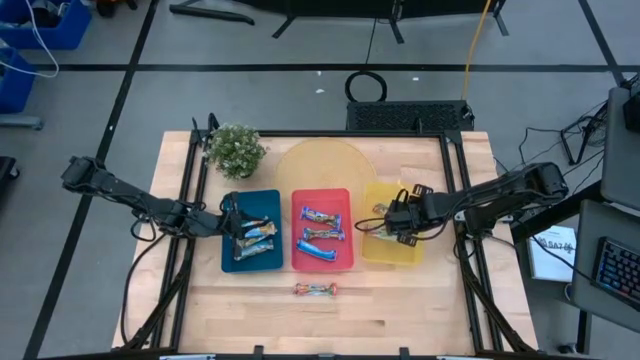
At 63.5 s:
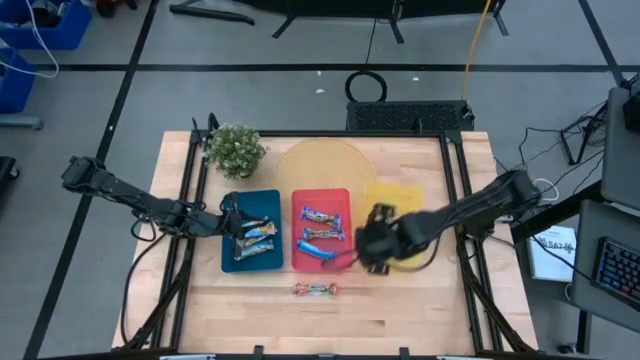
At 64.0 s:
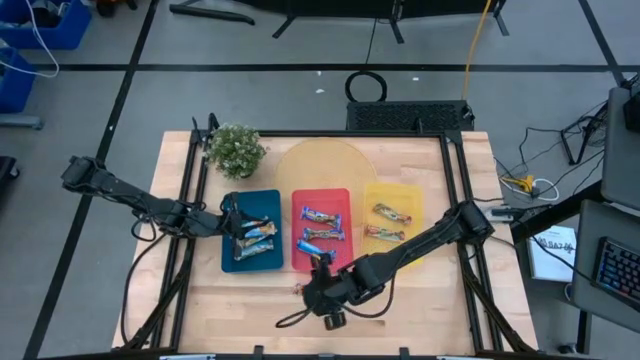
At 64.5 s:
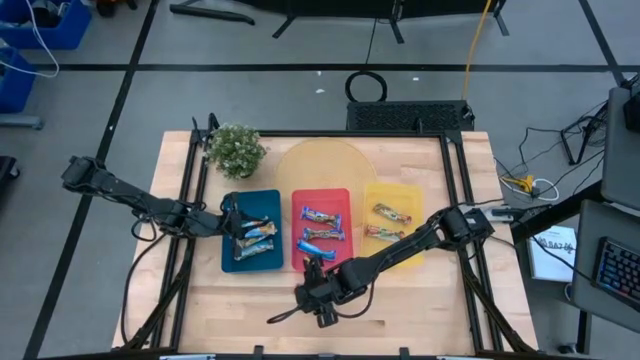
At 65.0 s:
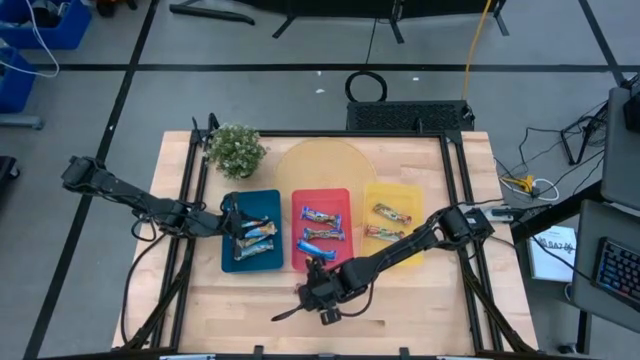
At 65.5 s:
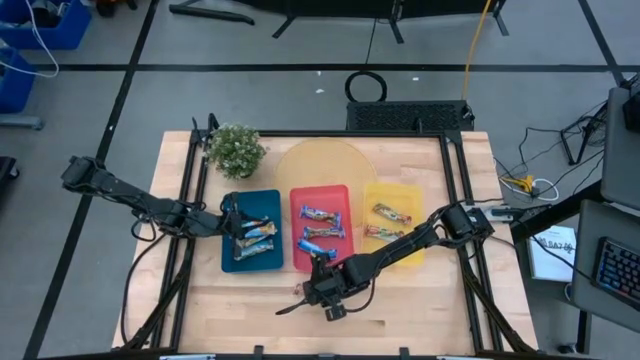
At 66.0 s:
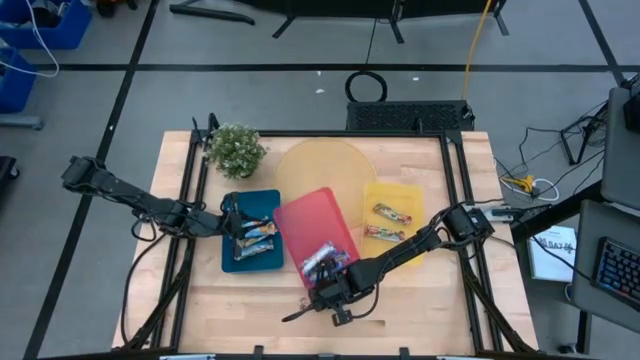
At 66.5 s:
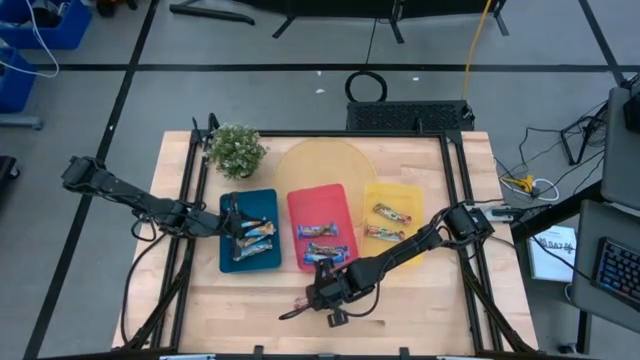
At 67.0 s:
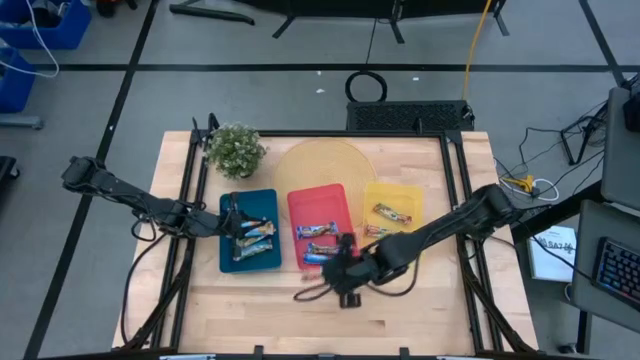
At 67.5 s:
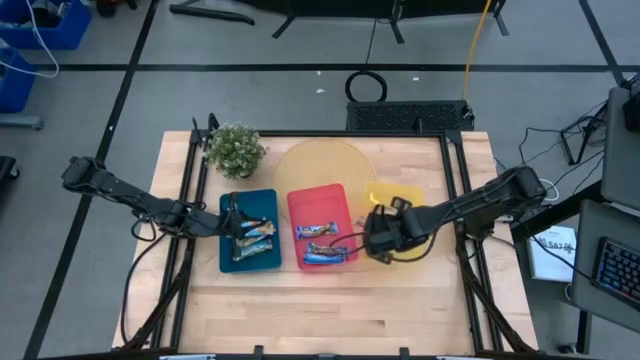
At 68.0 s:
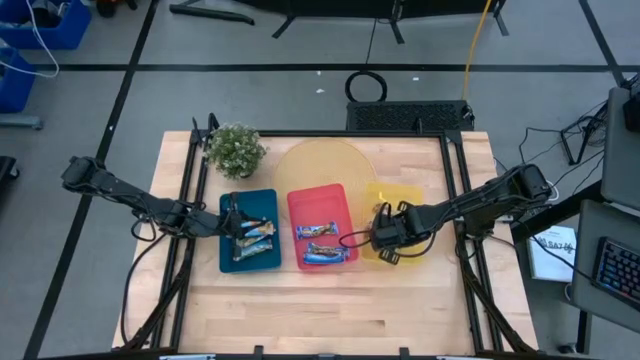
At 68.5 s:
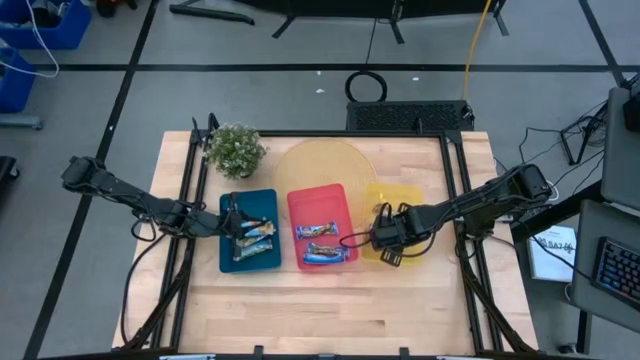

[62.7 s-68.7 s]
Task: Pick and place Granola Bars by type
Put the red granola bar into the yellow bin

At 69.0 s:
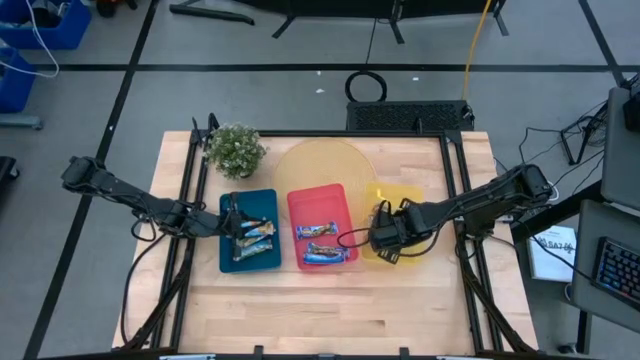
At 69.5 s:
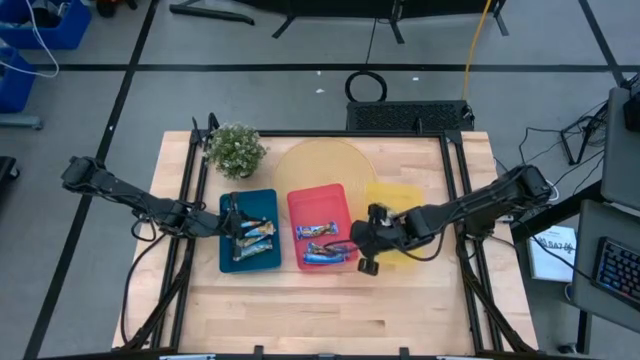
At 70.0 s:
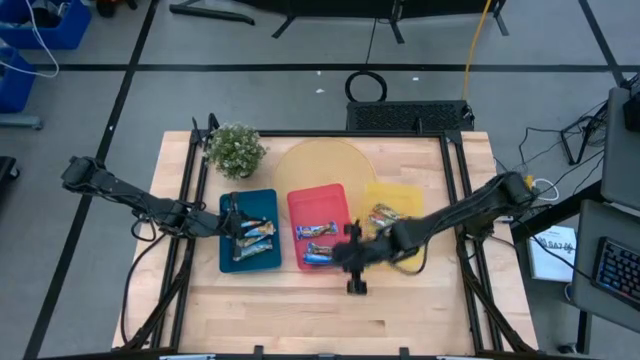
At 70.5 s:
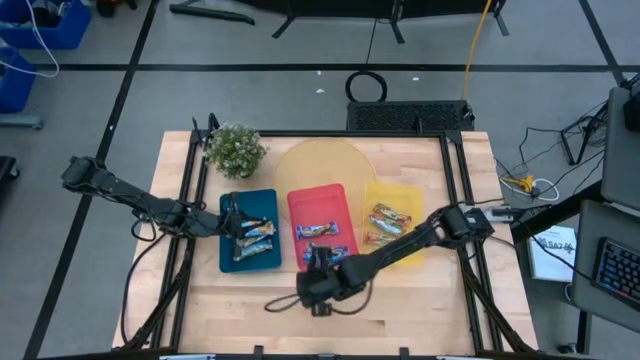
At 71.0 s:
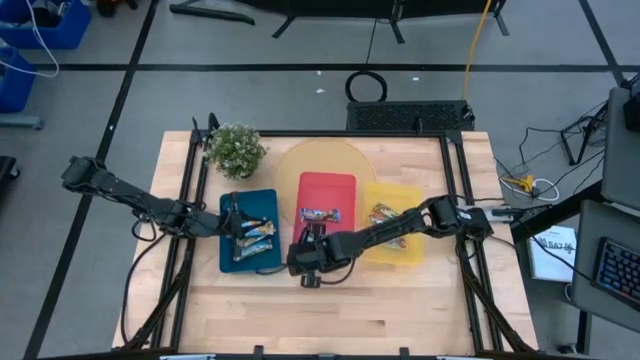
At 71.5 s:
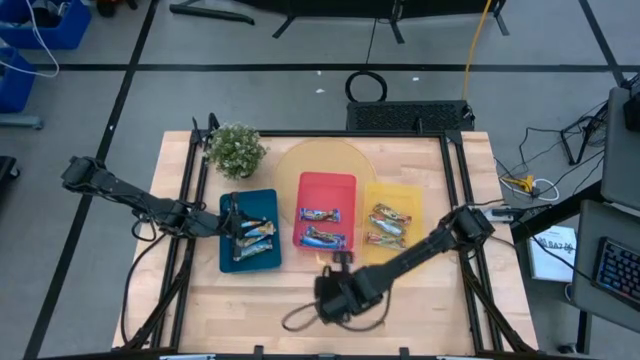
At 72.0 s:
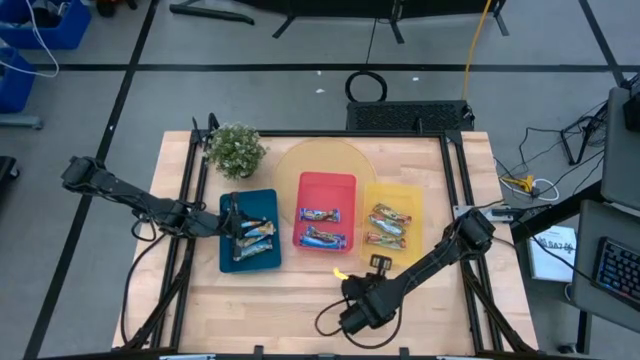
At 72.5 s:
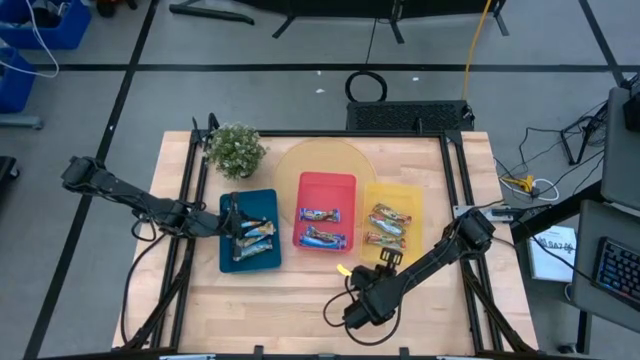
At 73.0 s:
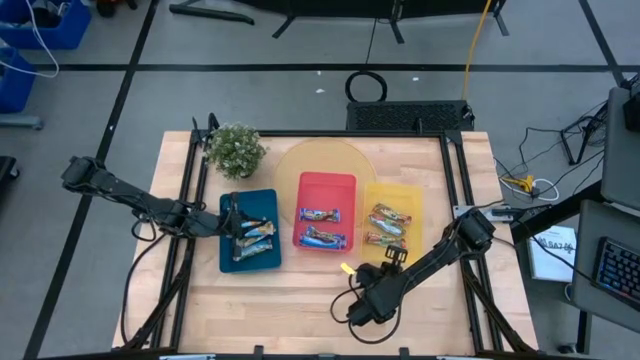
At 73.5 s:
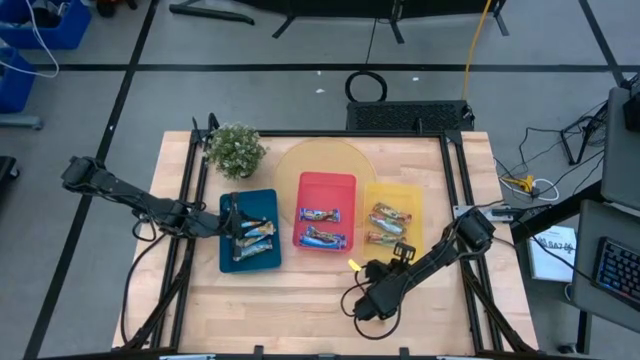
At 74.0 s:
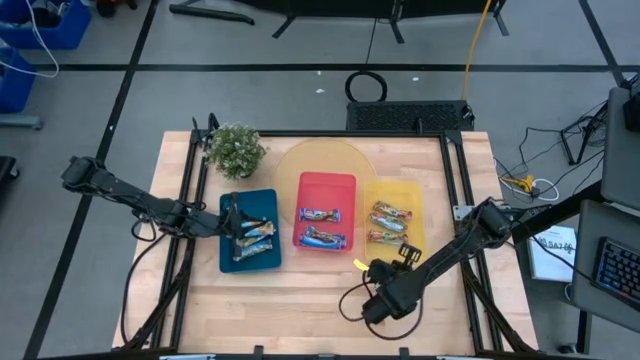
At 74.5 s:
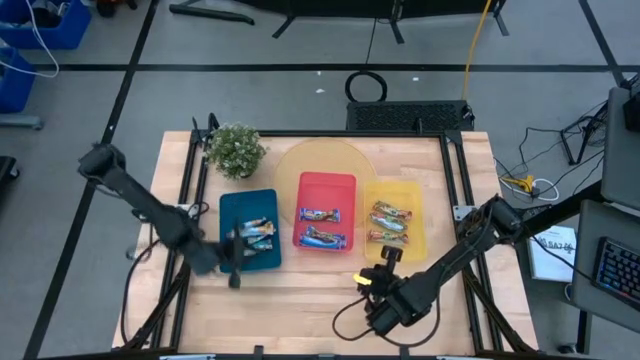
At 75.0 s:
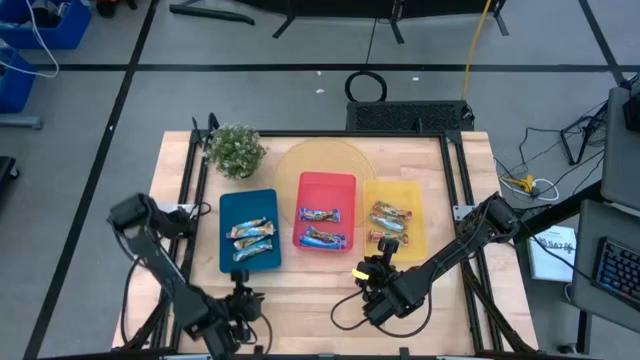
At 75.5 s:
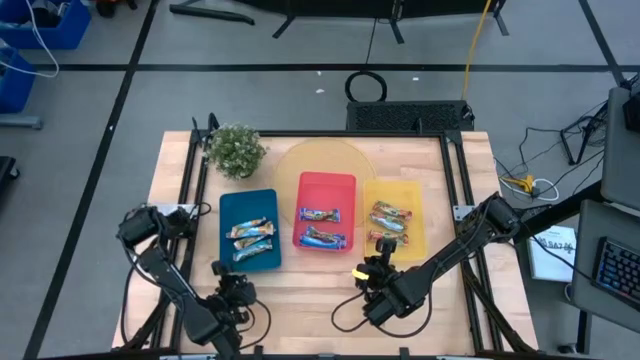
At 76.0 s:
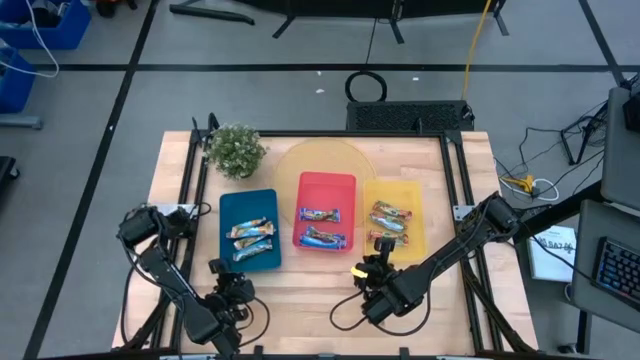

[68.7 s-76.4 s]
Adjust the bins

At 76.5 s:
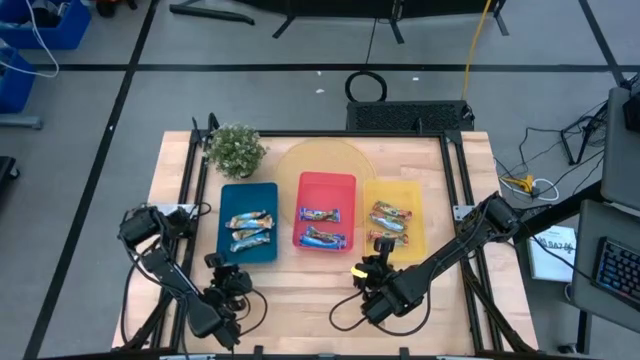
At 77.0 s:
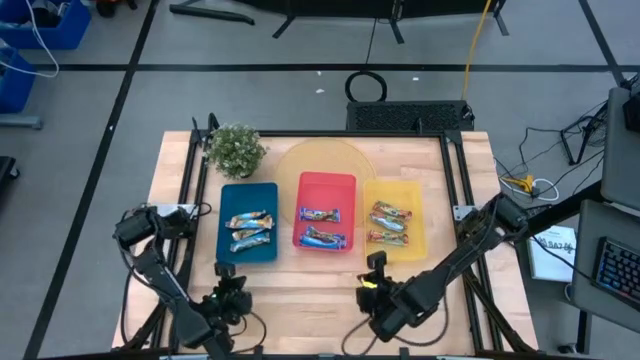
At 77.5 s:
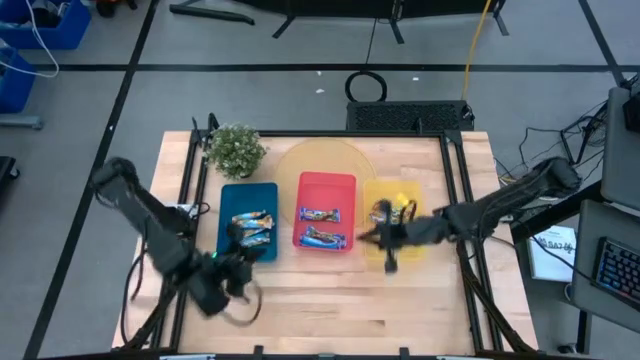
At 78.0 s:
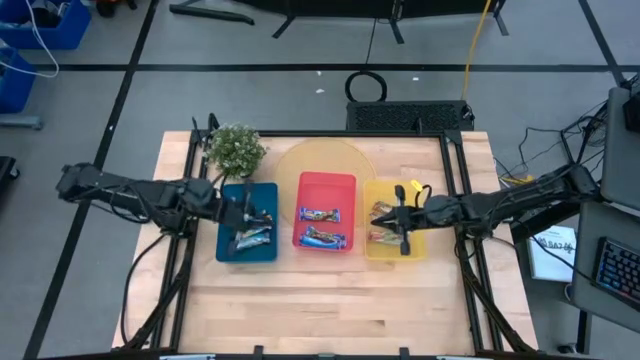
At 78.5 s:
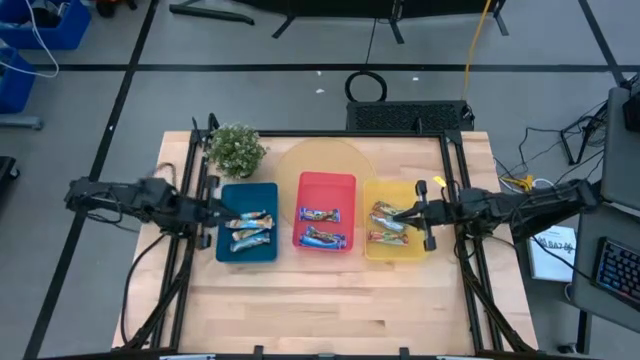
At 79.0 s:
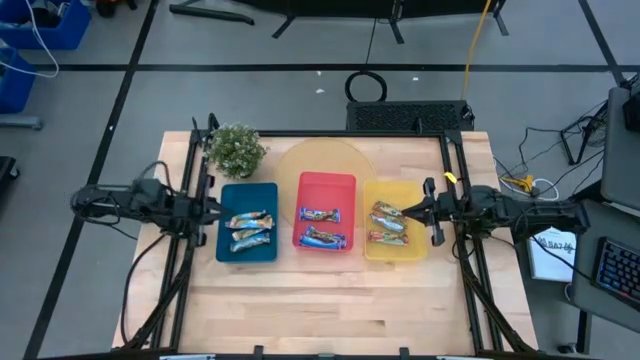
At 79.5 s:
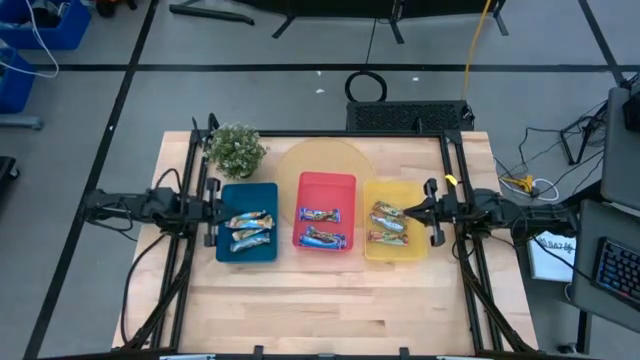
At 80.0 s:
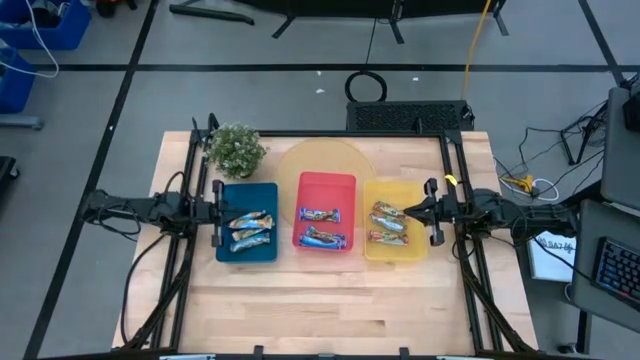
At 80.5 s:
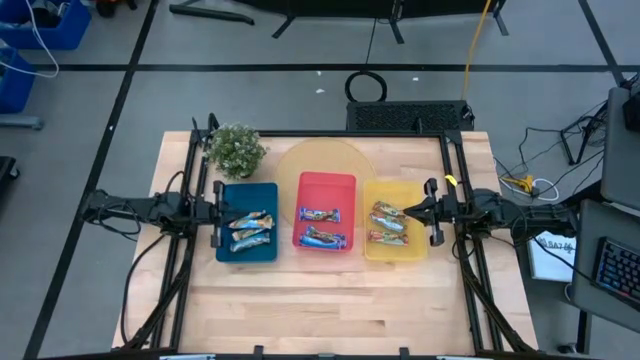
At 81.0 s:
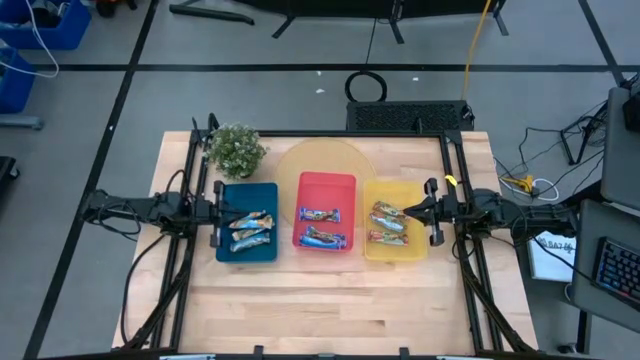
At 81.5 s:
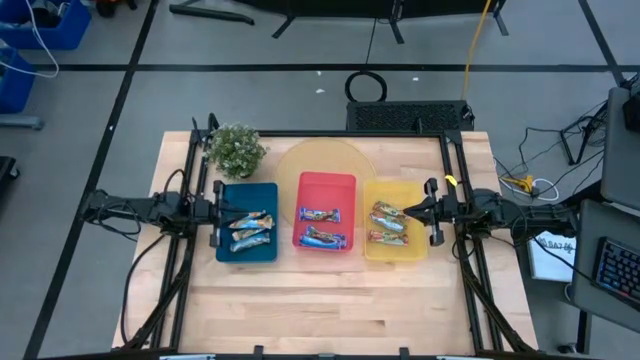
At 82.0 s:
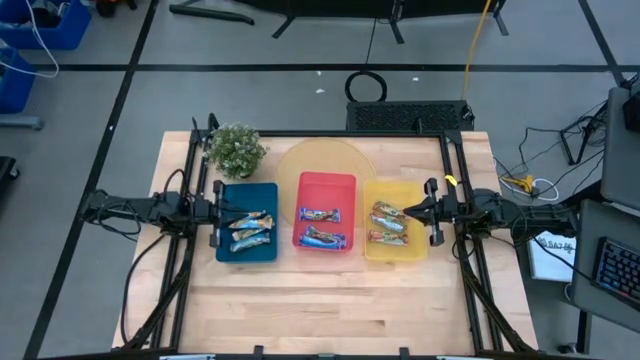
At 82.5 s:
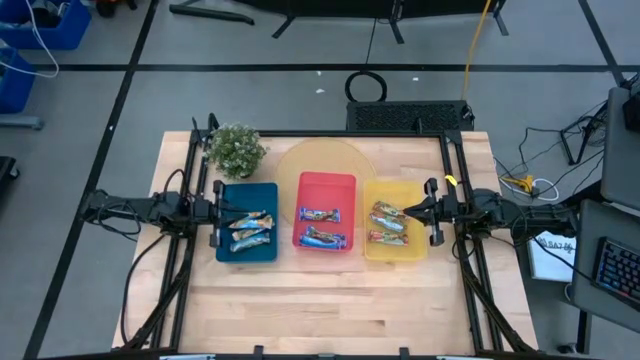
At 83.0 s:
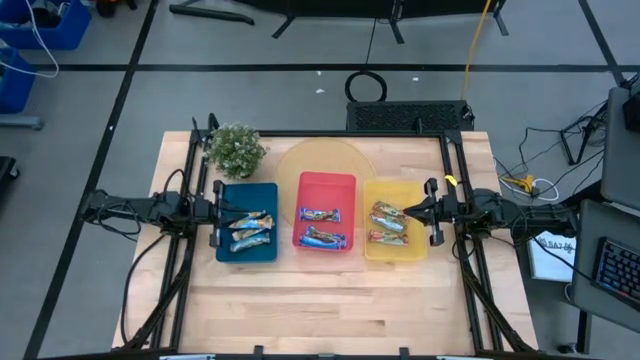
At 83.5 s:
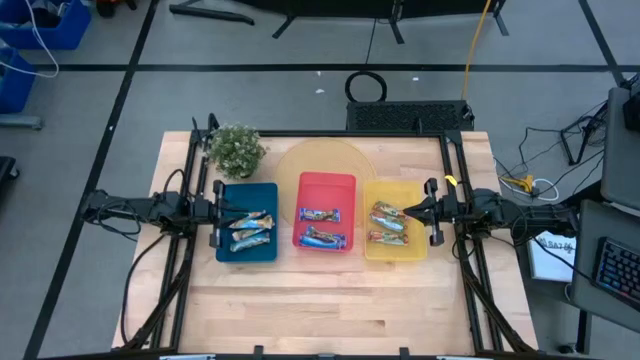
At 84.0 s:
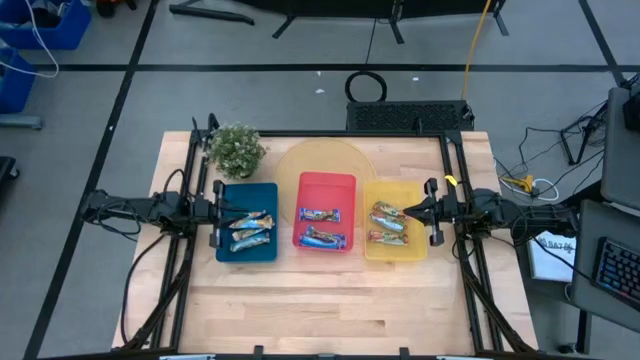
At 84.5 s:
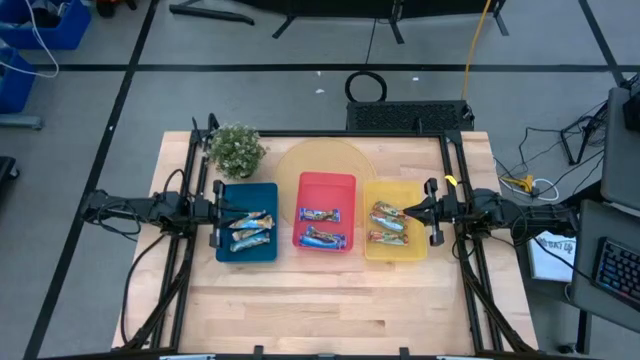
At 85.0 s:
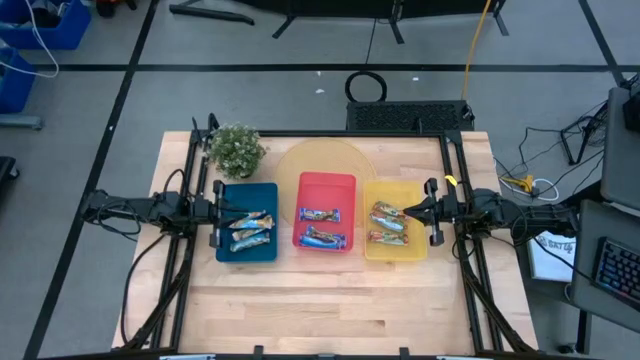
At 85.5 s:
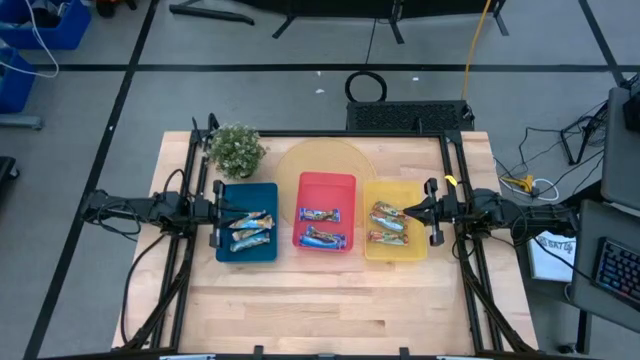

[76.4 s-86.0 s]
Return to Home Position
